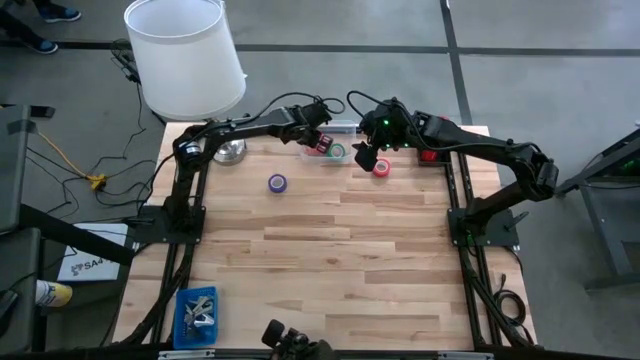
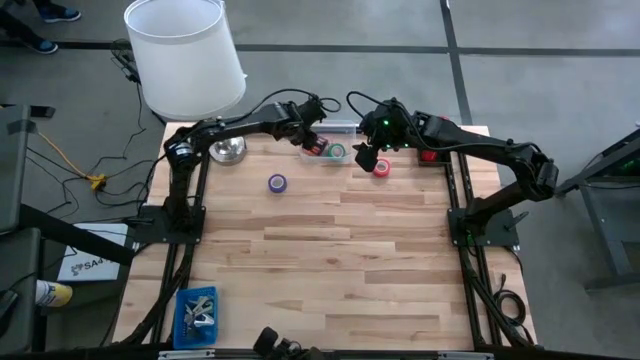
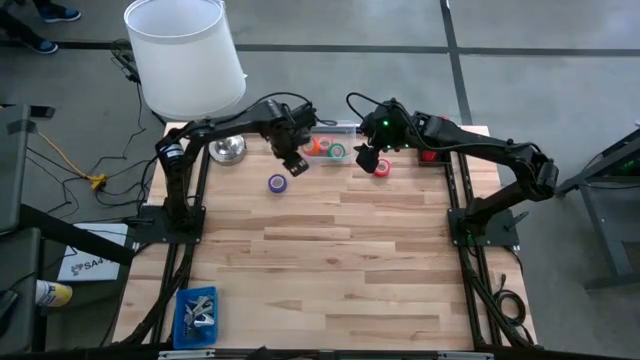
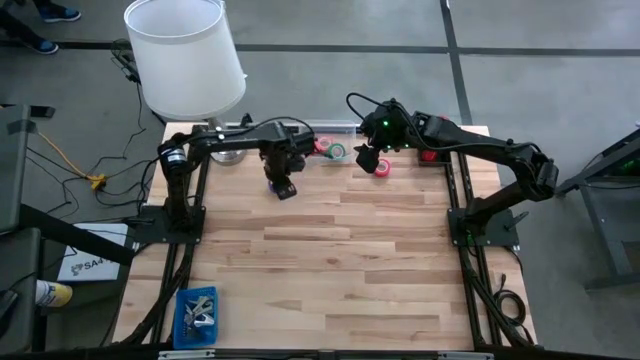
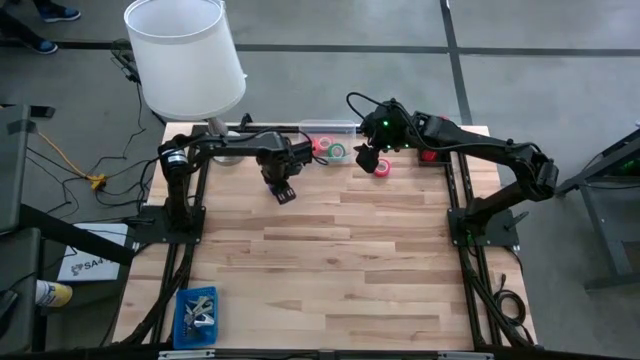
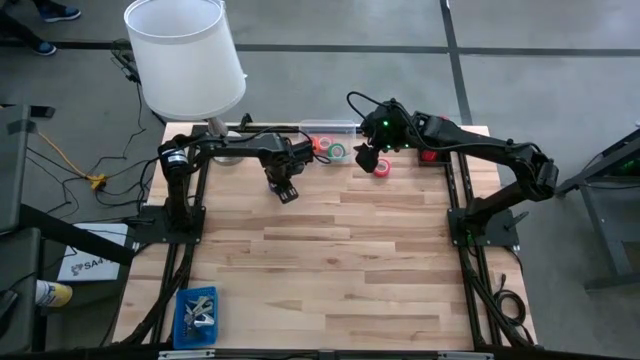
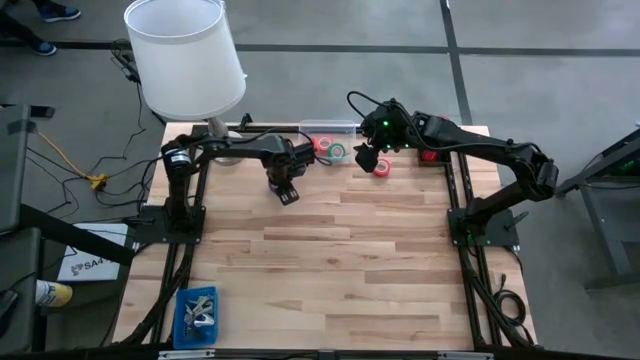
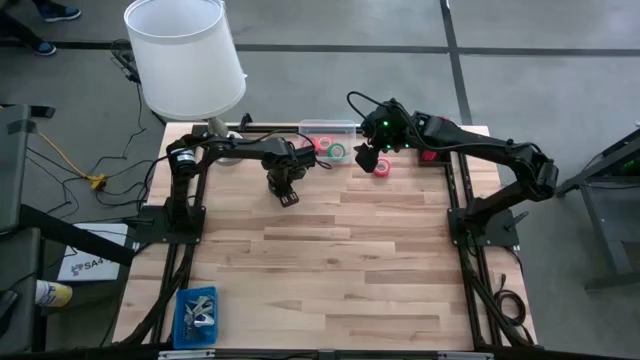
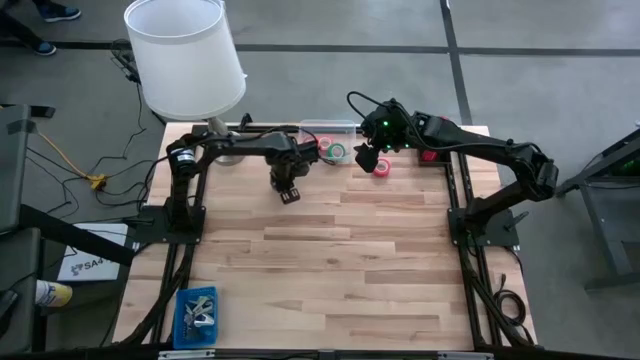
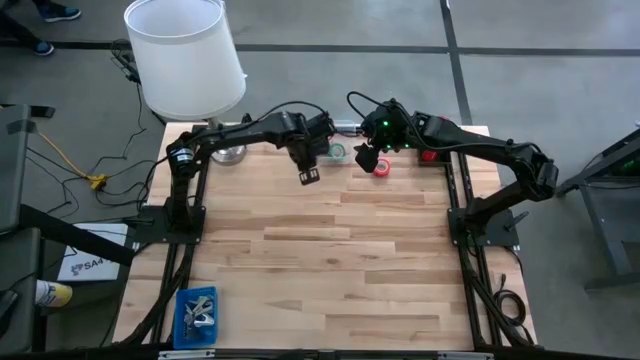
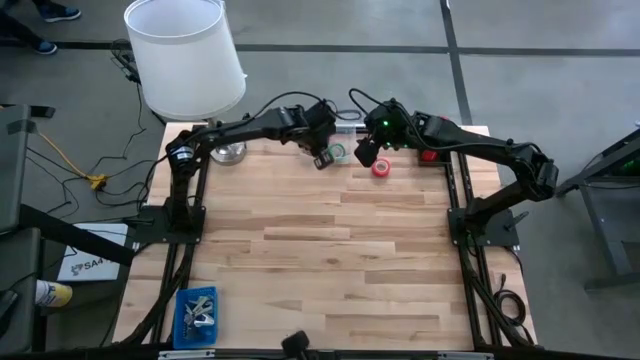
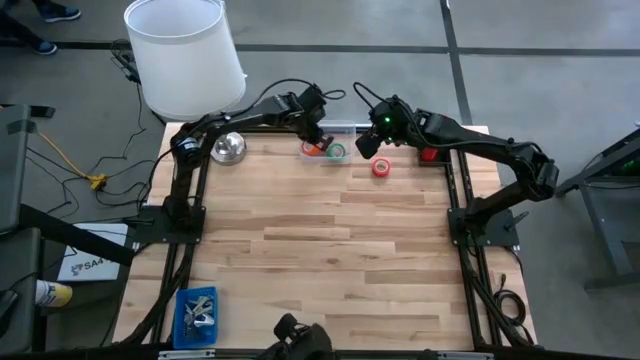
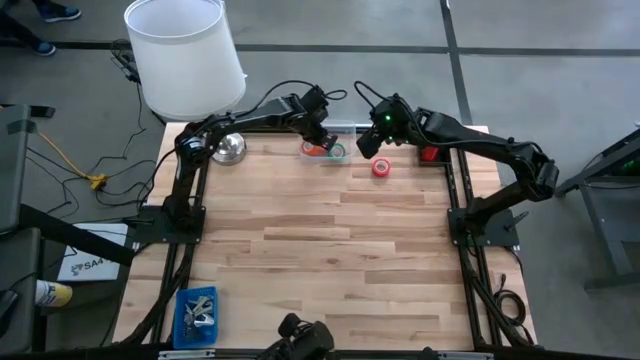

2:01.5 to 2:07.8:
Task: Pick and place Stapler, Stapler remover, tape
Put the blue tape into the transparent bin

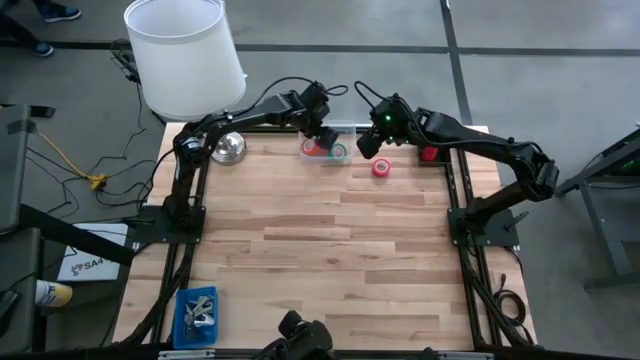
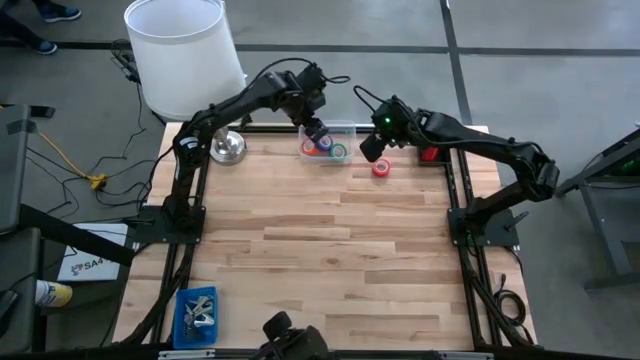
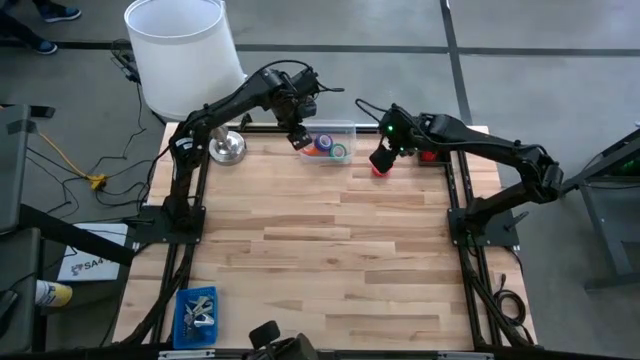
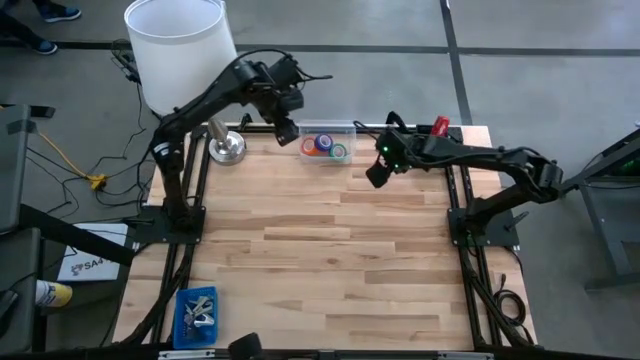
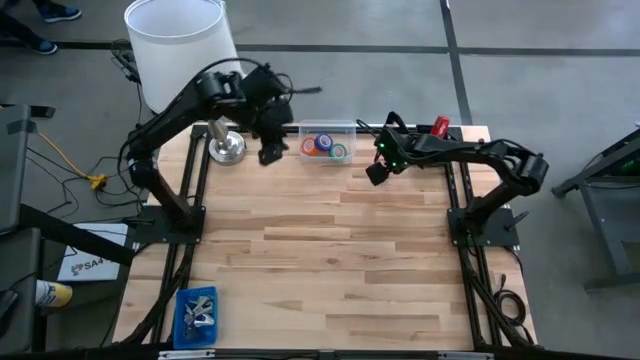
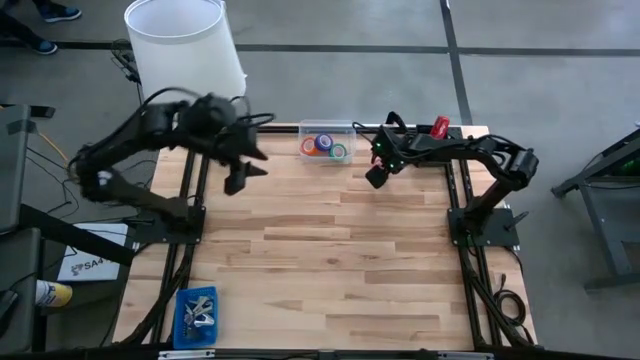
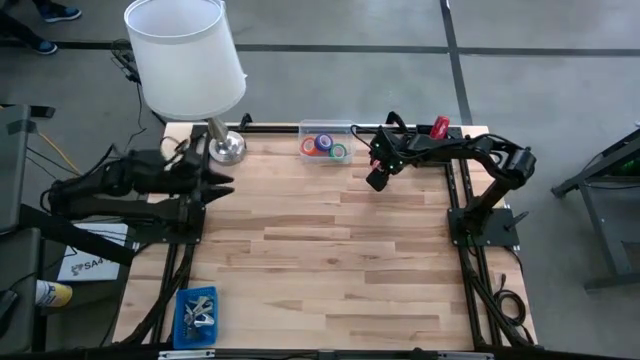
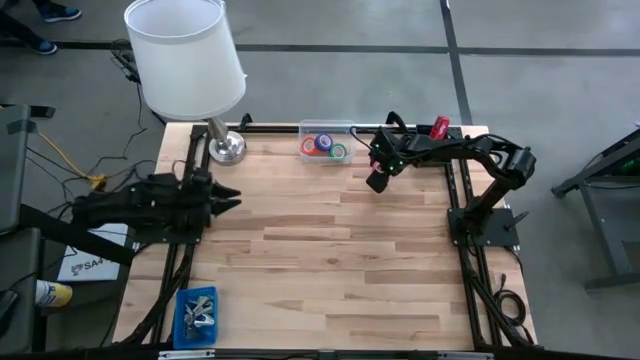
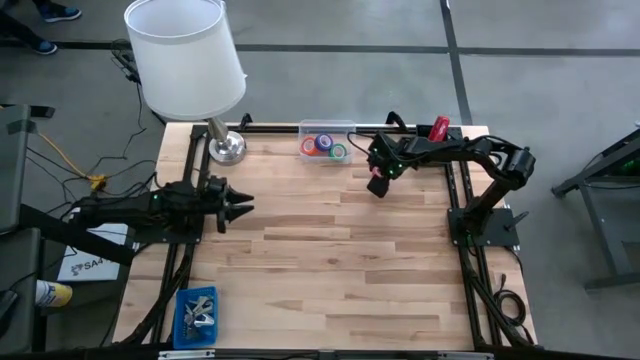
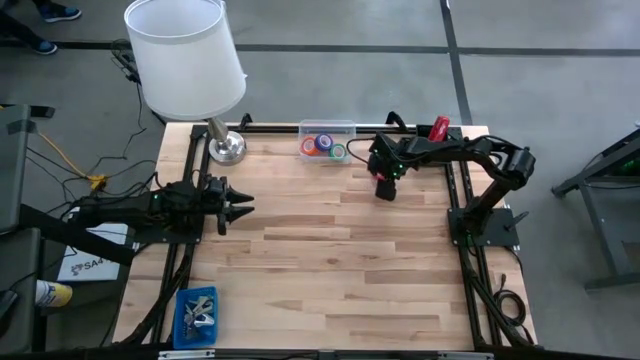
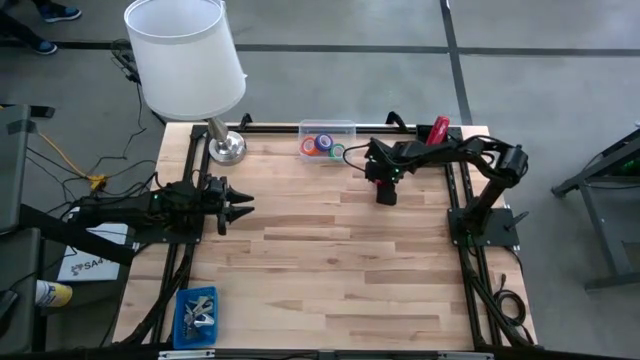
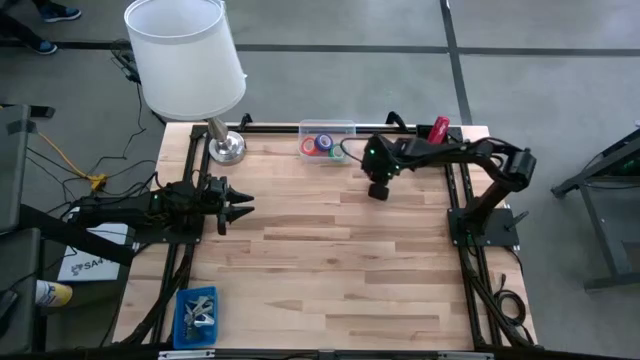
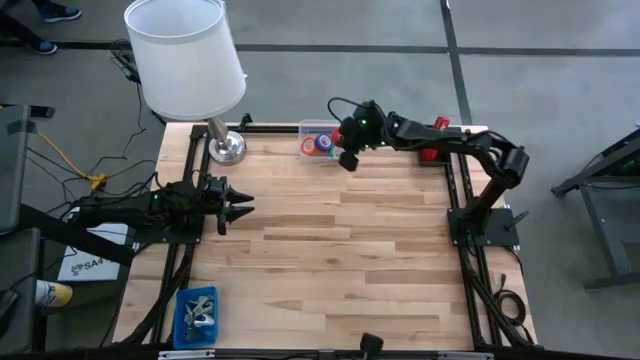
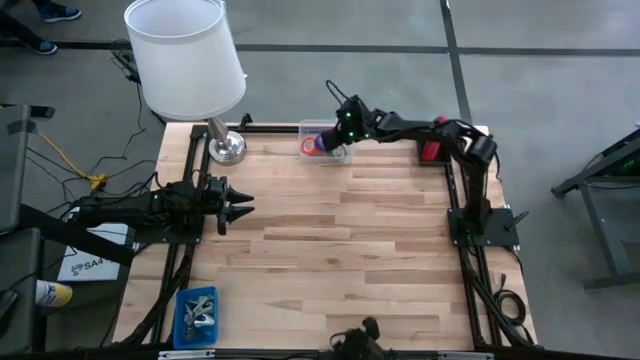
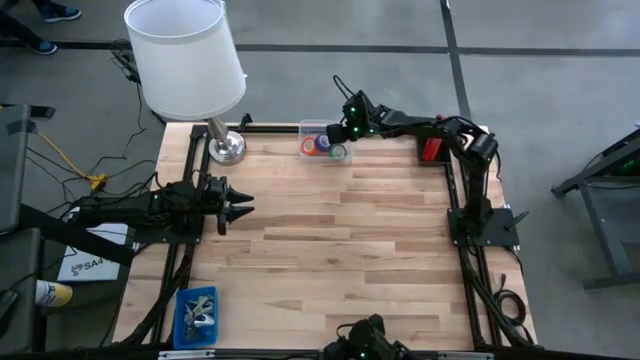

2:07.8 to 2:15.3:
Put the red tape into the transparent bin

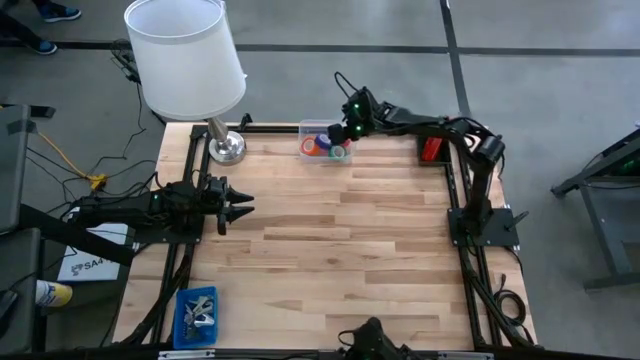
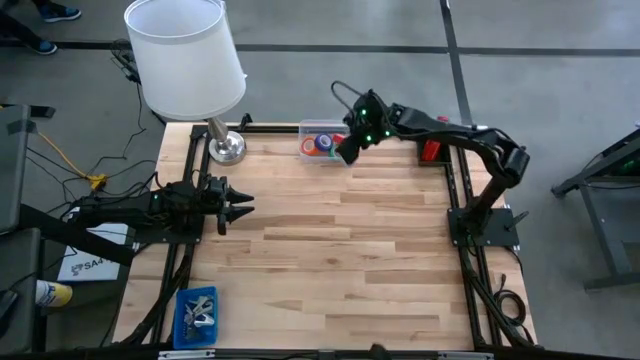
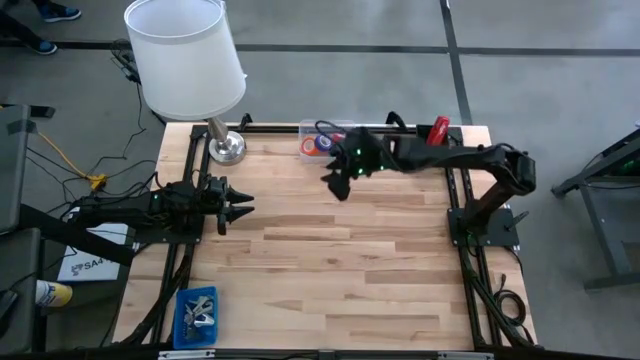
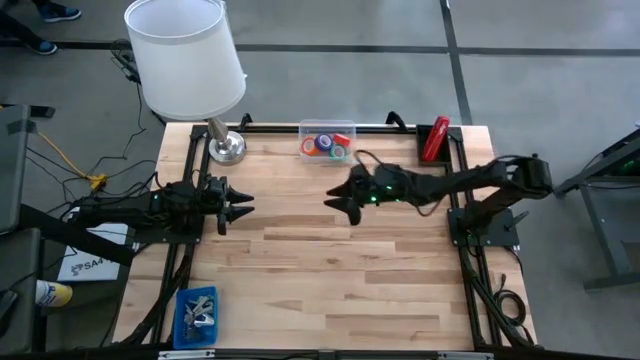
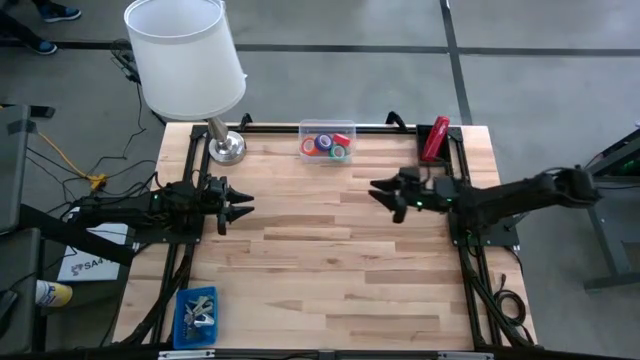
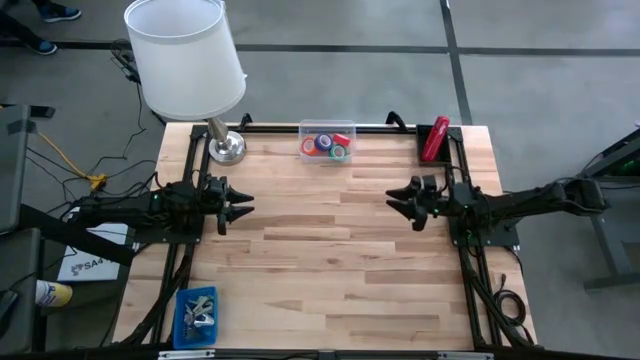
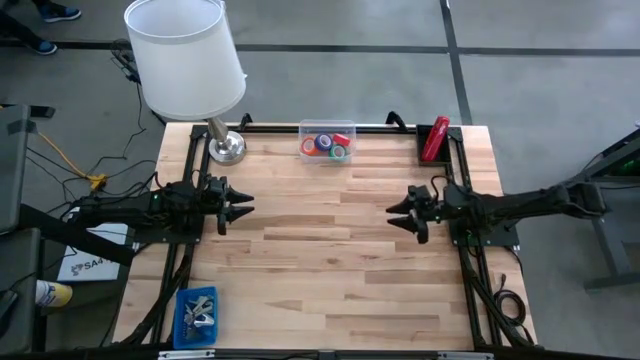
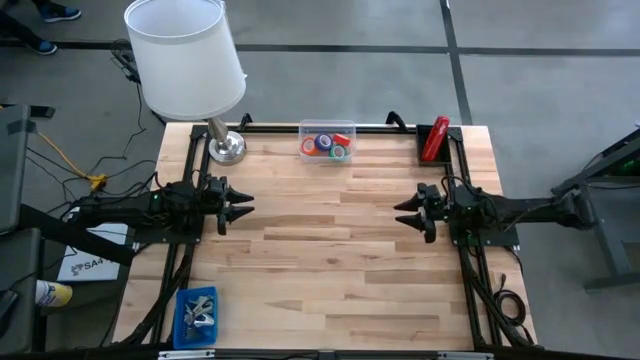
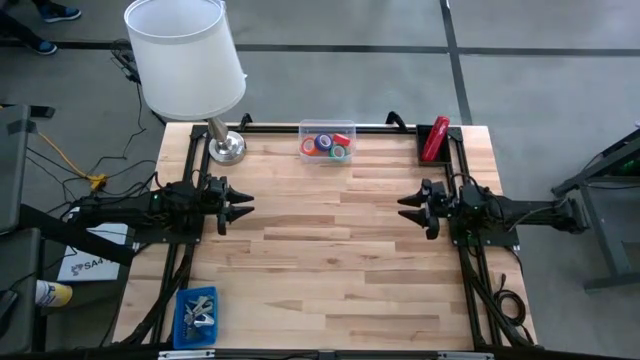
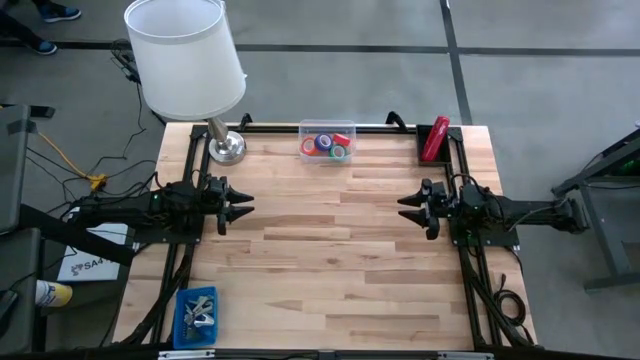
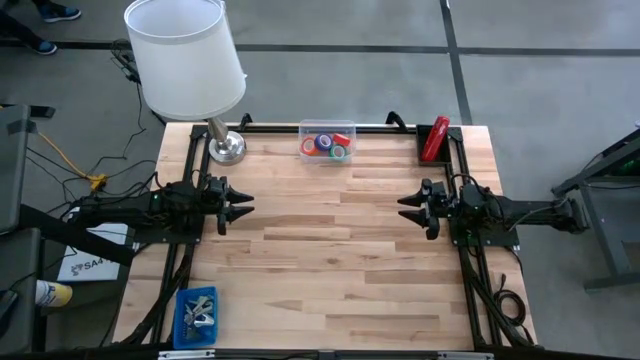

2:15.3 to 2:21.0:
Return to Home Position

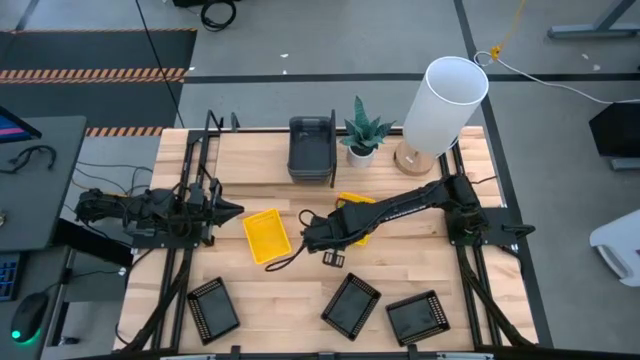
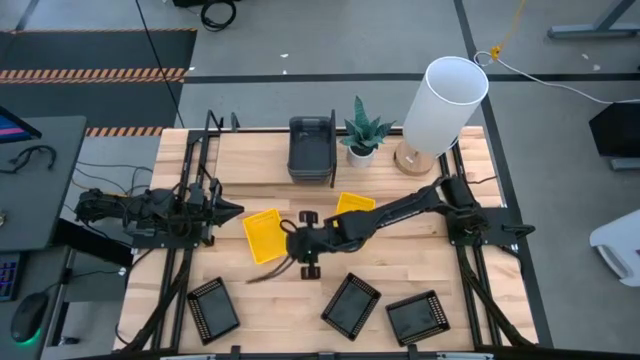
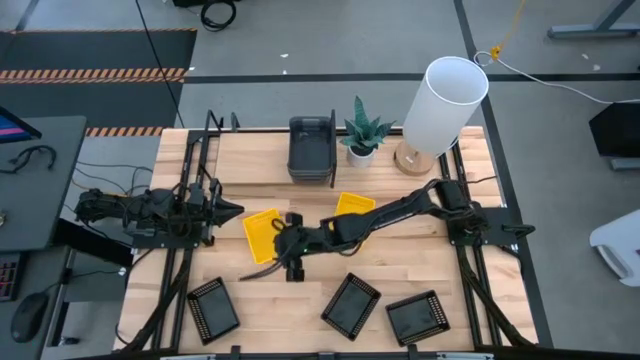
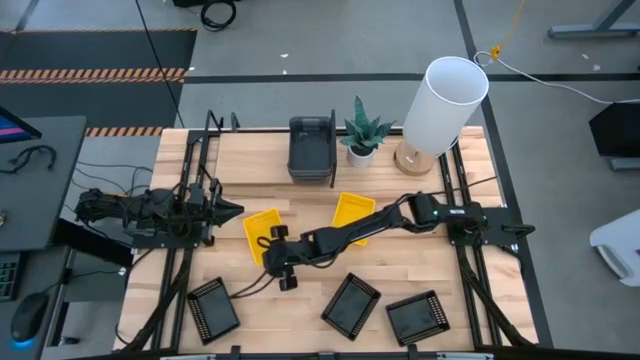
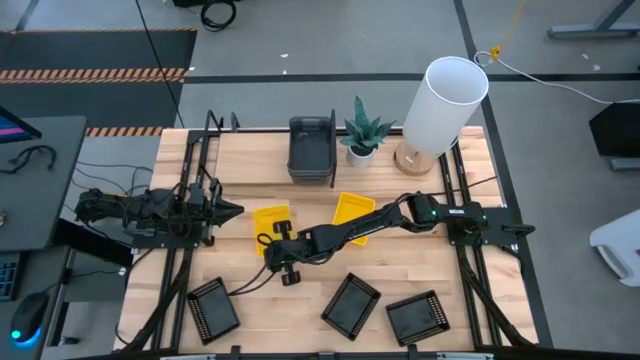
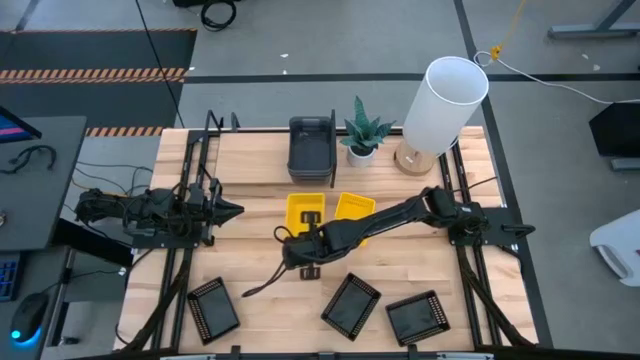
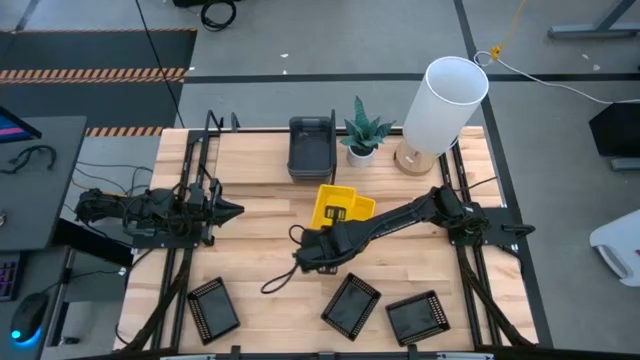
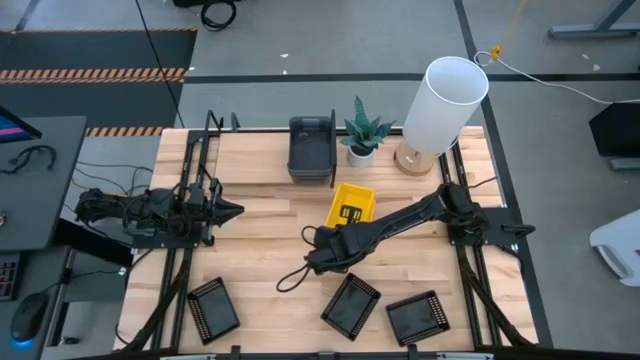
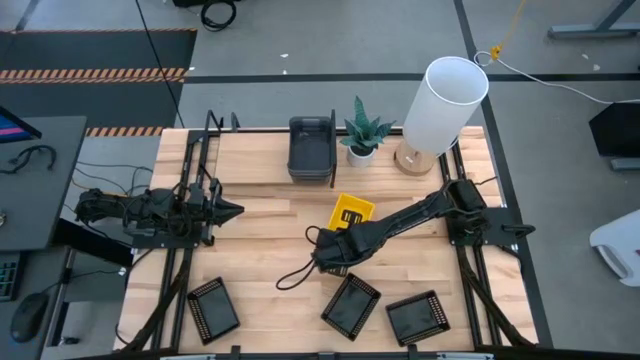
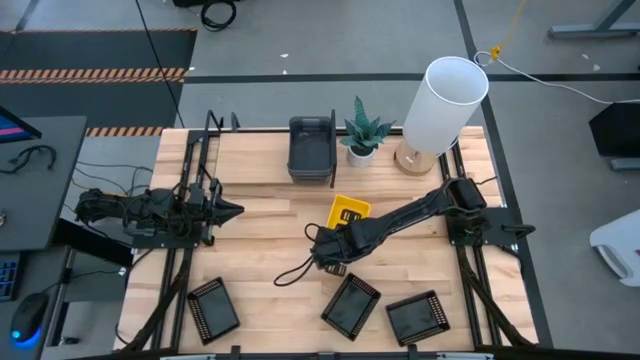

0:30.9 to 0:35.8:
Task: Stack baskets on shelf by color
Stack the left yellow bin into the other yellow bins
